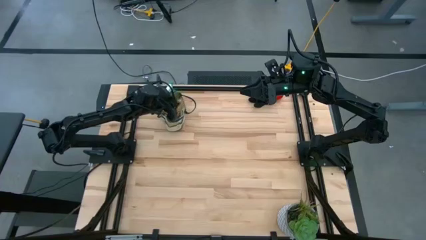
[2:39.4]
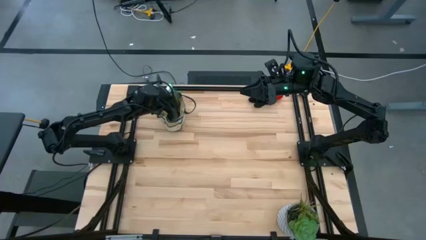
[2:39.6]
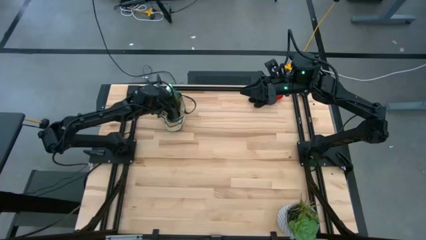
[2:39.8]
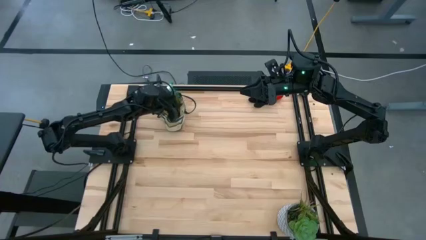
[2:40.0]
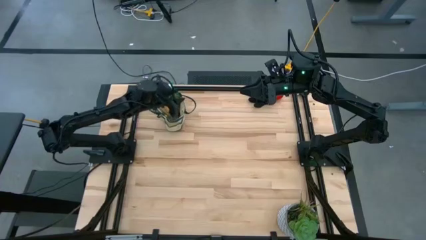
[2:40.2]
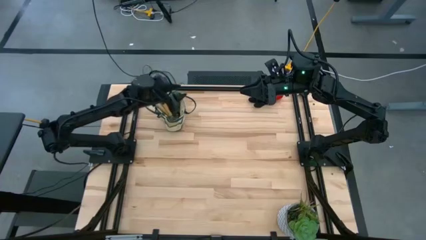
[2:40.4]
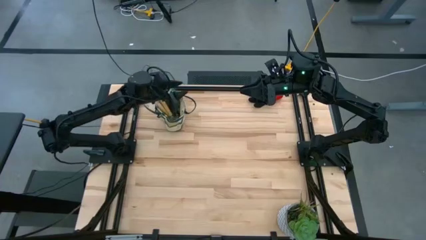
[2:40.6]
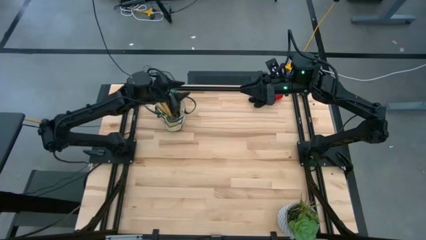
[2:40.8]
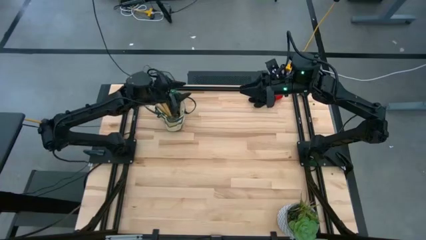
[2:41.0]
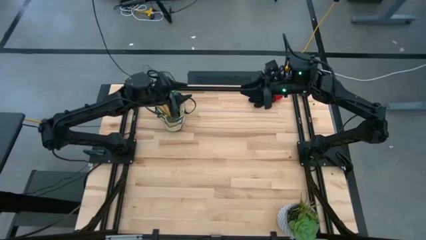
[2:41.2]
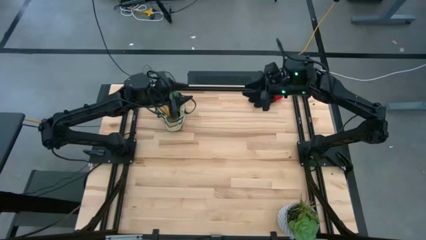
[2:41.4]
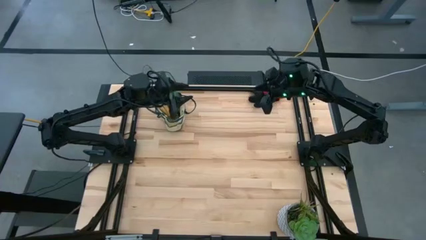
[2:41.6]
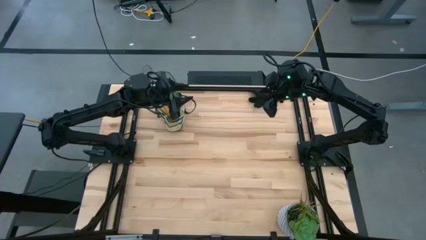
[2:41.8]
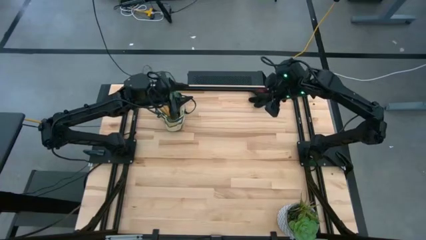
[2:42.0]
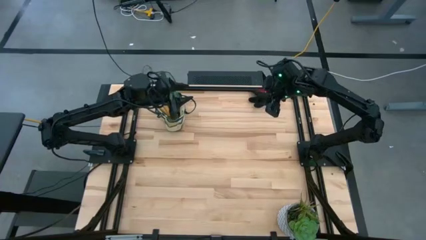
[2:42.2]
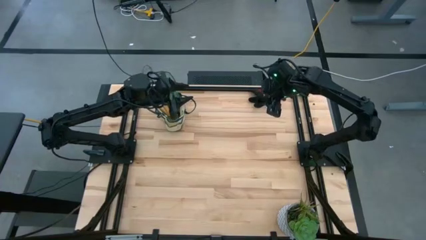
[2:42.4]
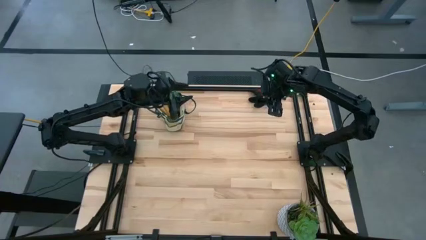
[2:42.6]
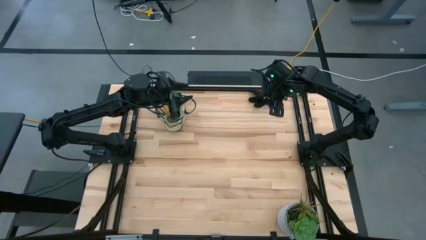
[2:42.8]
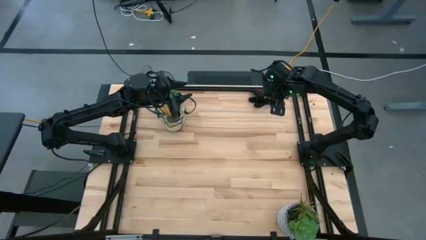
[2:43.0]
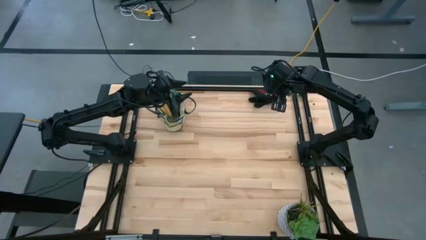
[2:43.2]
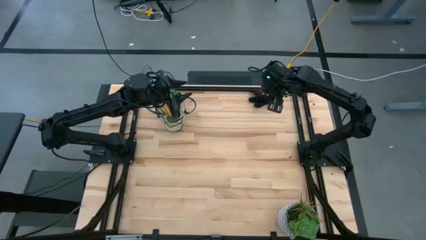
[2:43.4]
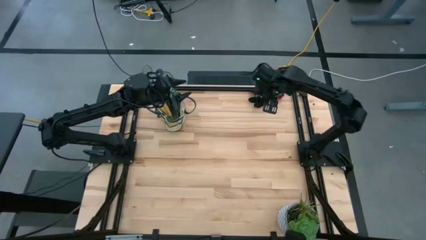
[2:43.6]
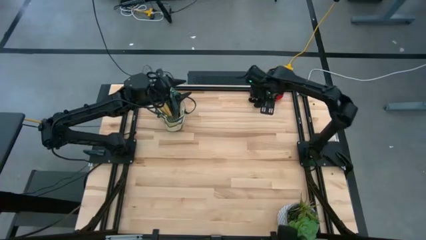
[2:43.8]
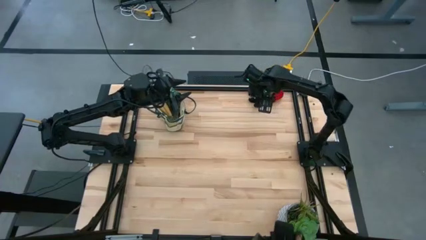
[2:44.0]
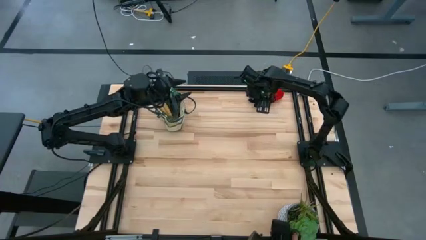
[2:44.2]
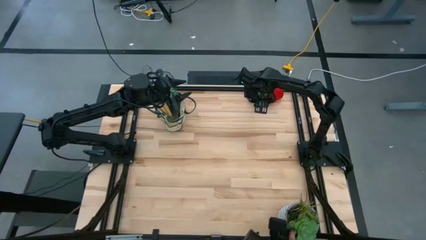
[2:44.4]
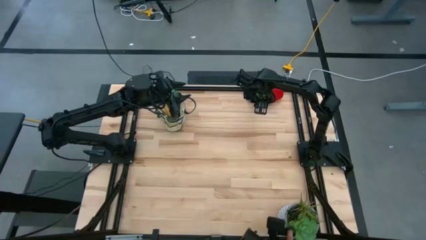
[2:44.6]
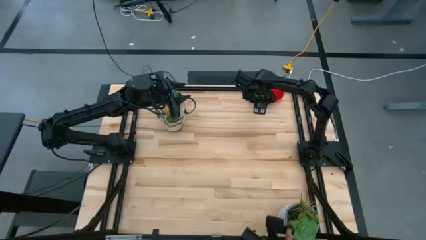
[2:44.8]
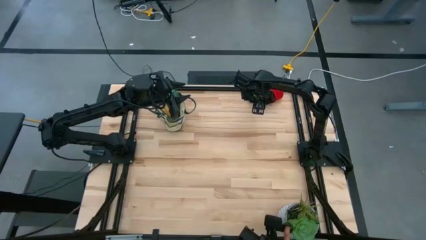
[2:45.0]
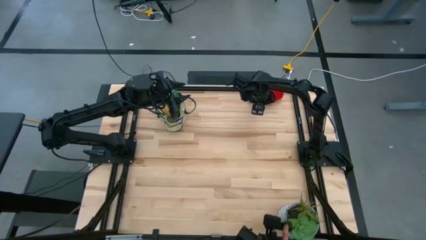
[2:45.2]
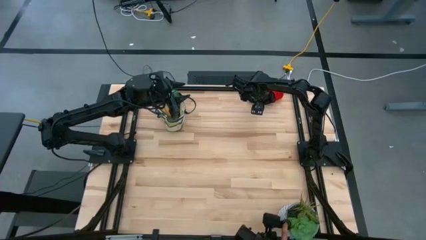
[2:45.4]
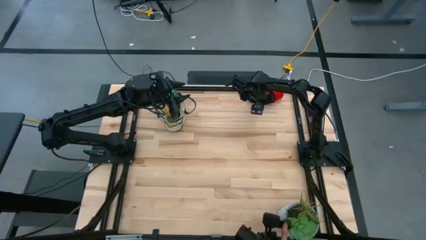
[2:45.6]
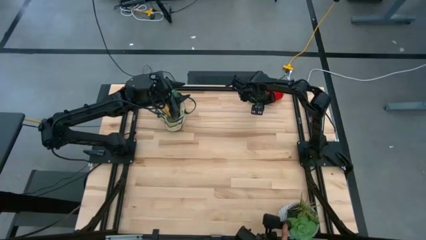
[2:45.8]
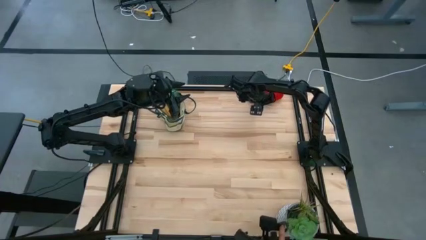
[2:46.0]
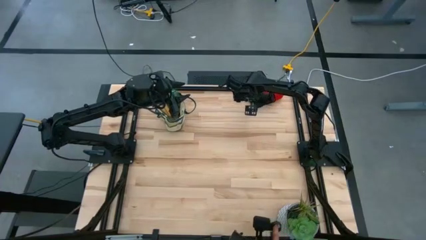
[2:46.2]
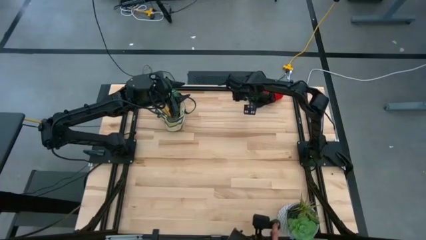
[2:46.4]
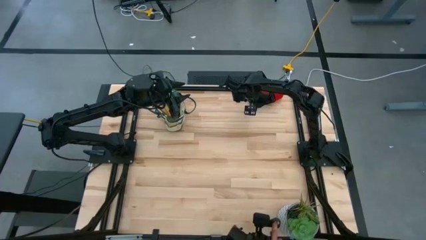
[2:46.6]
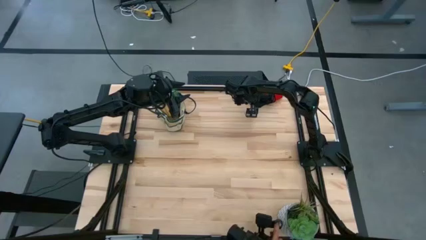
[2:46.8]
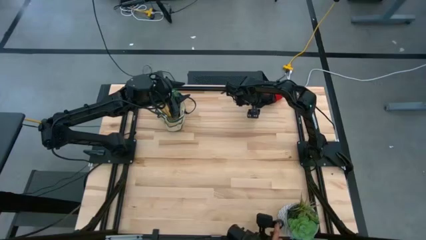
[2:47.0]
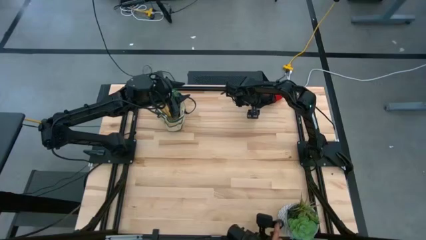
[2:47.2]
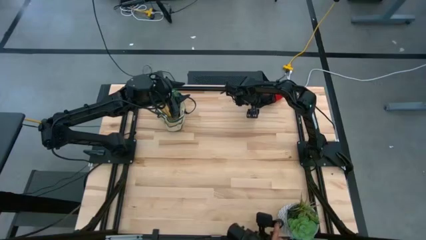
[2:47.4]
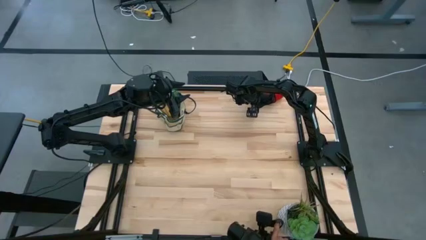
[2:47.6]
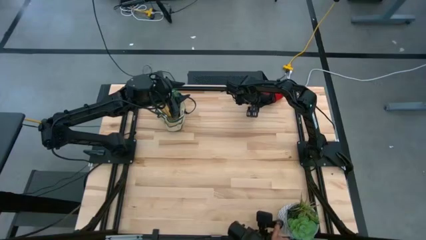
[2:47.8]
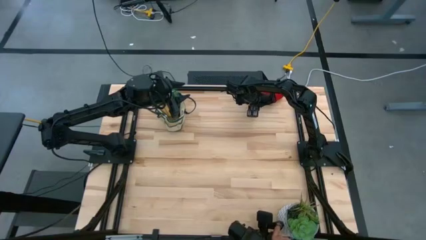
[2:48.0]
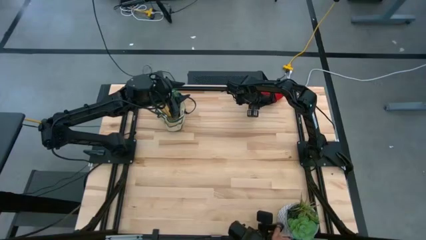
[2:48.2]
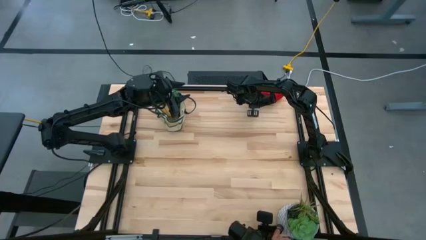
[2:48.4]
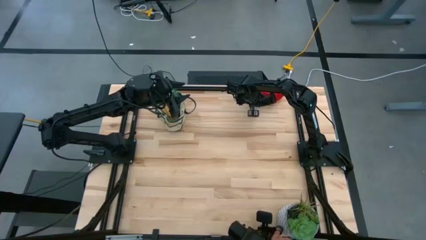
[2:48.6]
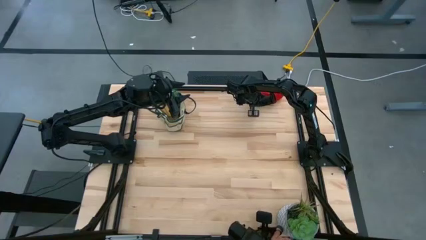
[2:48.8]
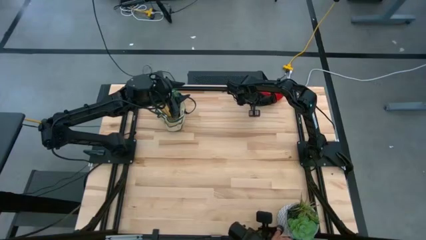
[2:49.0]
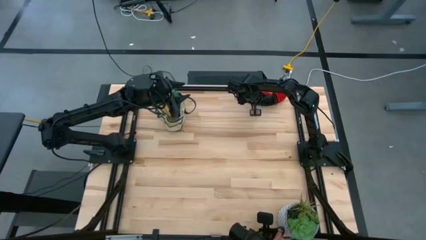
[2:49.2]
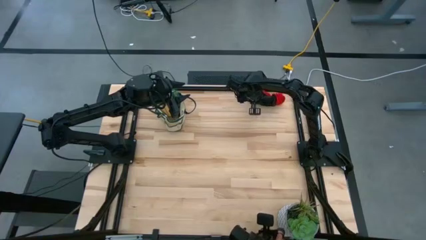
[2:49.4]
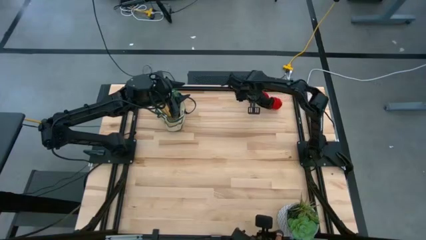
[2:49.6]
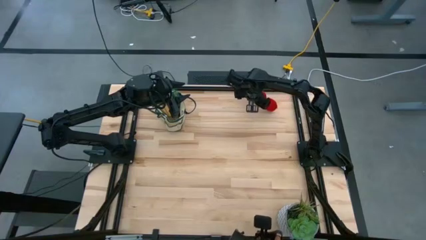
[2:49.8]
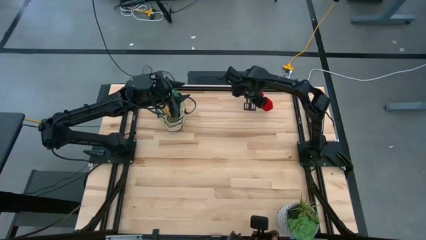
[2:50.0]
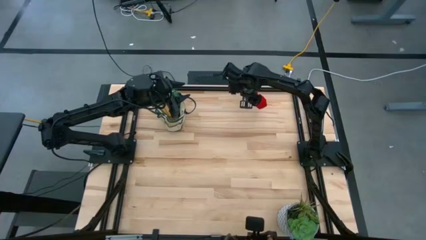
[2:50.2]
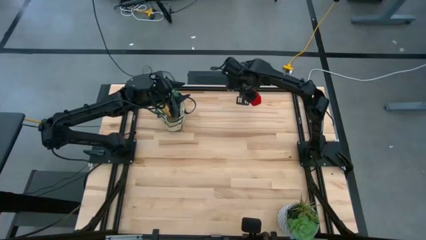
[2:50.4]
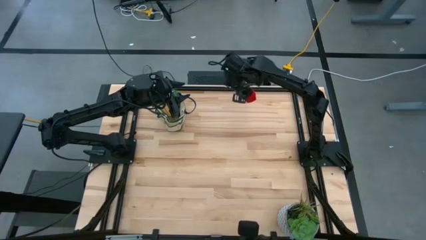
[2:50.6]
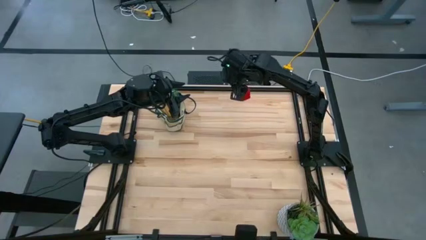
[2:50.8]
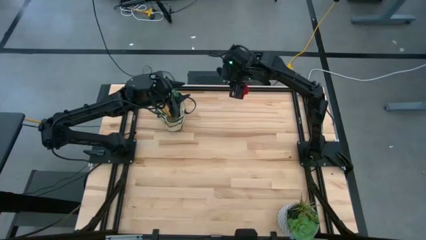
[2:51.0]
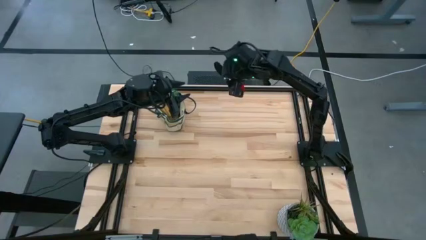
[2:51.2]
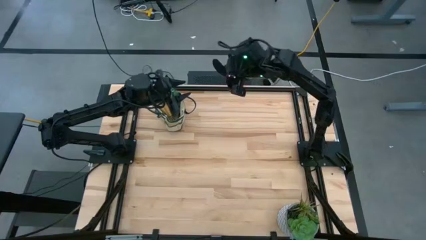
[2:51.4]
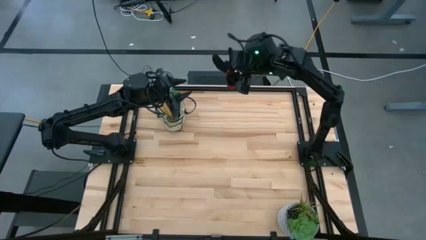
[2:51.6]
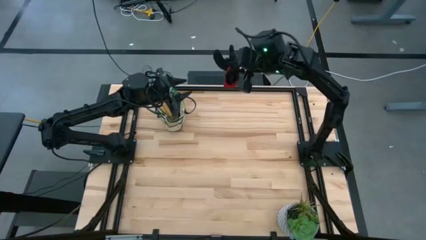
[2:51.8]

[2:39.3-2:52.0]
Task: Pick & Place Garden tools in Gardening bag
Put the red gloves into the gardening bag

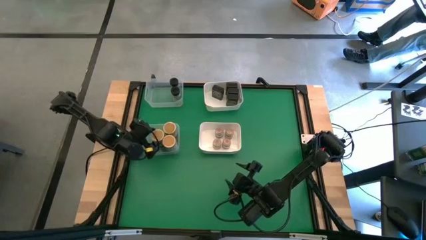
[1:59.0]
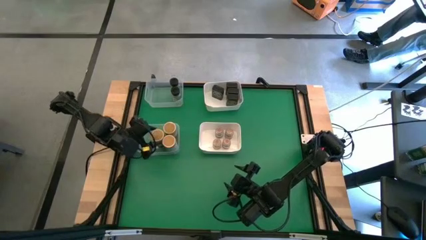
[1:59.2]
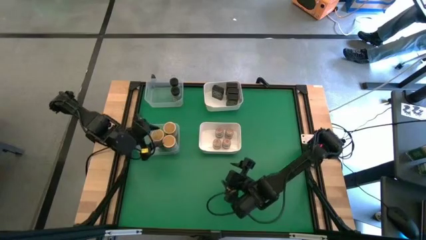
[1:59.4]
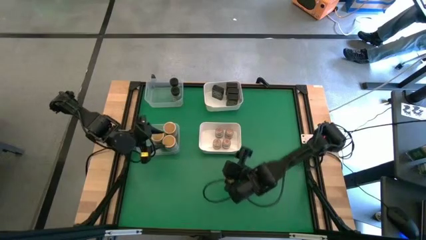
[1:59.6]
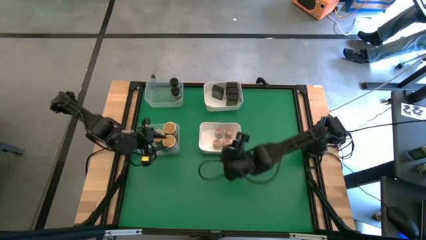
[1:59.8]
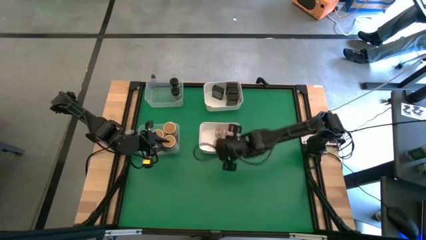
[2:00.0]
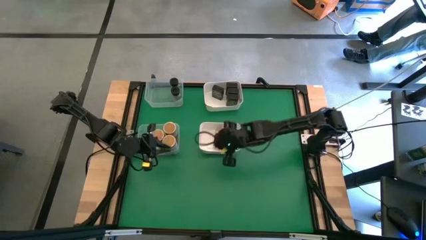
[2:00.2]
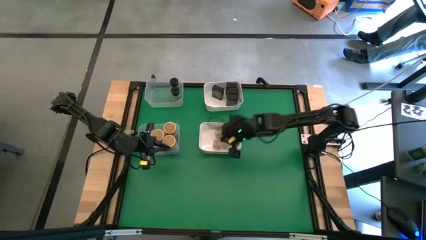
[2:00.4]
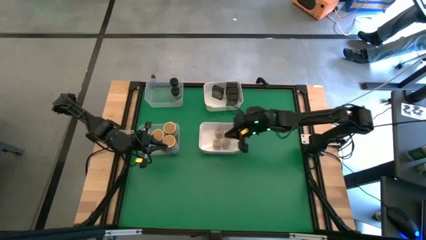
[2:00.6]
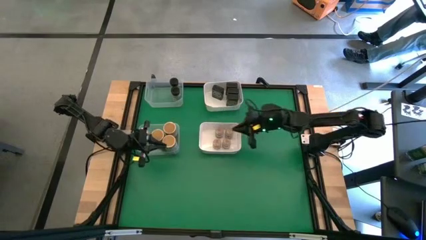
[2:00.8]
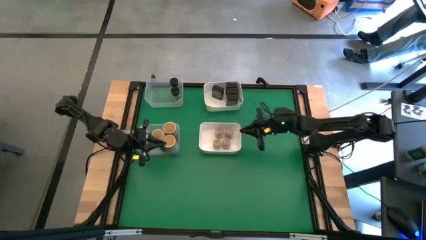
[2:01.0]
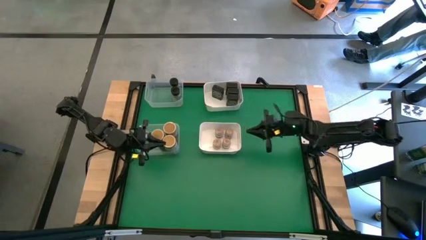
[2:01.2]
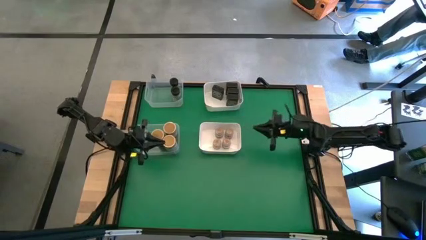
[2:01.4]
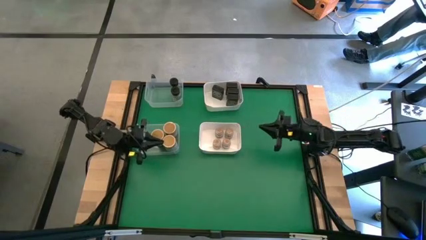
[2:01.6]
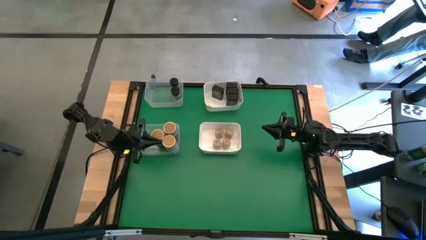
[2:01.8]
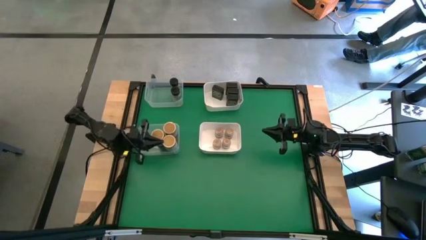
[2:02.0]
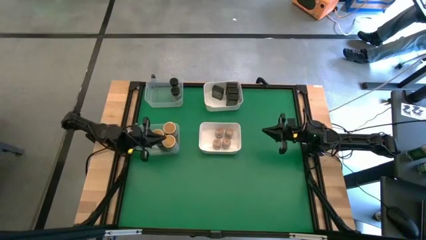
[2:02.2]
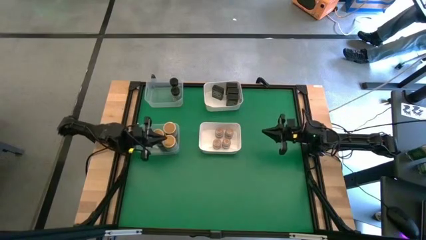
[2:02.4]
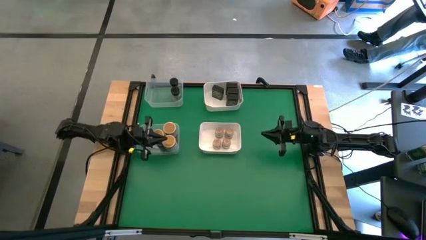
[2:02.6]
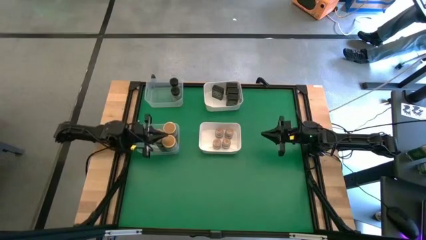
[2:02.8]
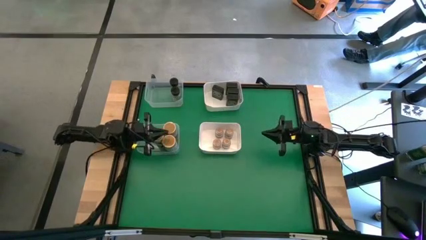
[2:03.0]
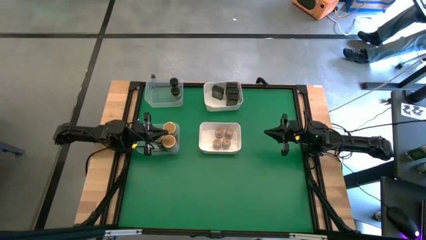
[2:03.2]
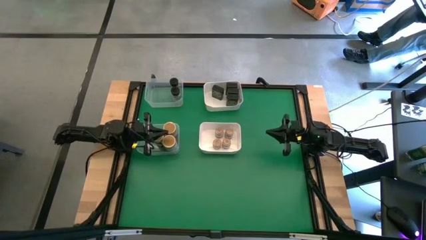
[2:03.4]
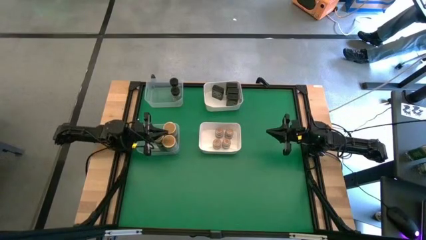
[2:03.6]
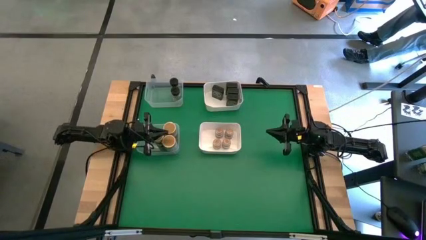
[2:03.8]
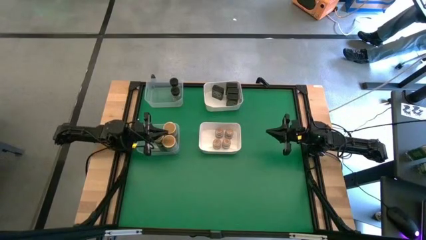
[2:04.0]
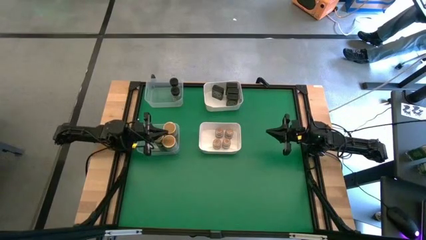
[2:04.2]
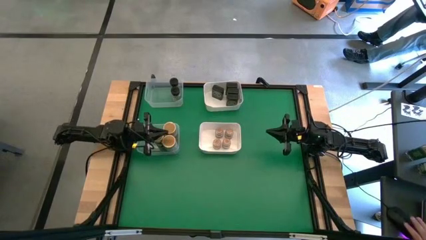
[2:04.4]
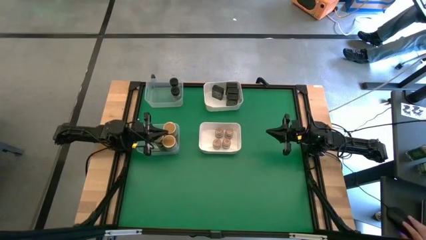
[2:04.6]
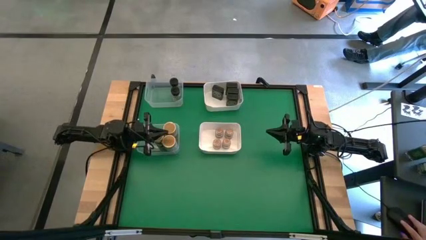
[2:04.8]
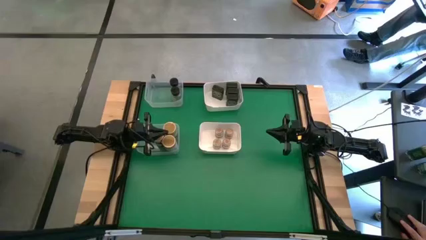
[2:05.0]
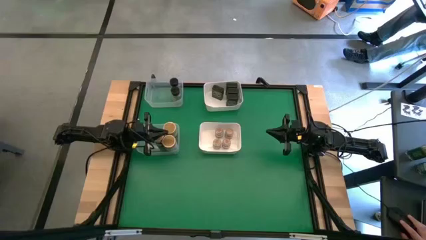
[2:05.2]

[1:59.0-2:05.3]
Task: Sort spices by type
Return to home position
